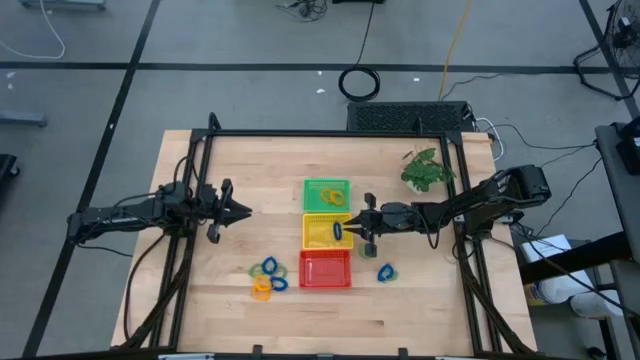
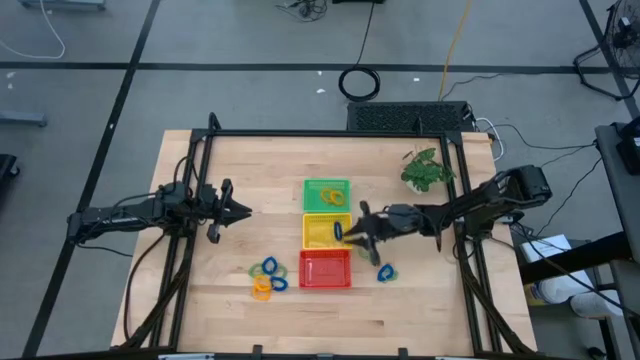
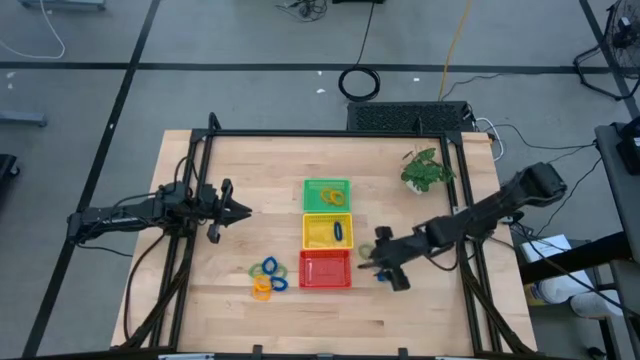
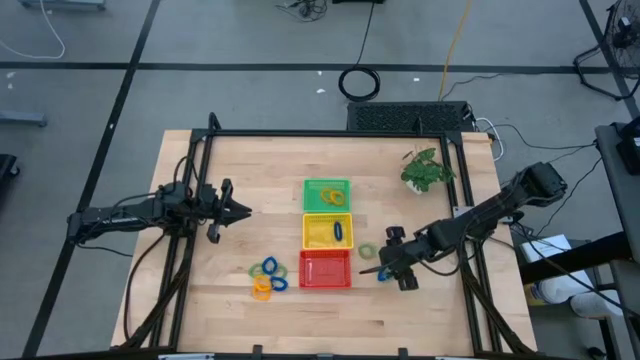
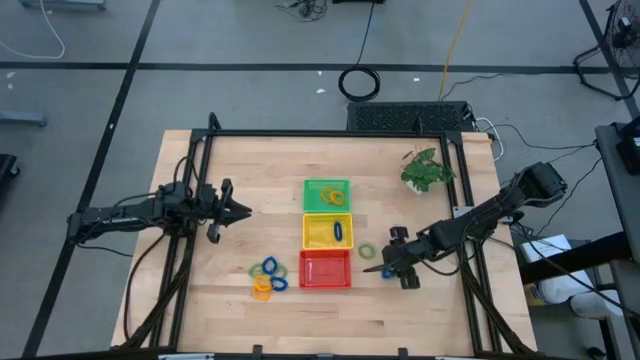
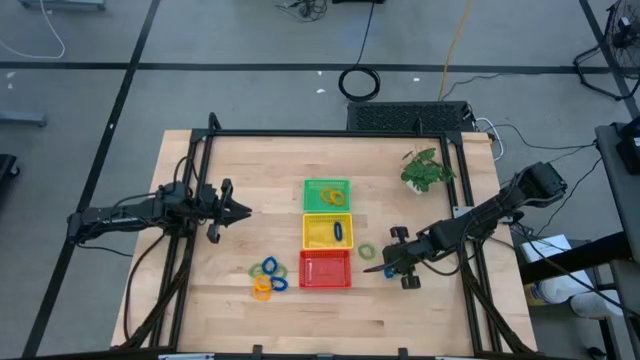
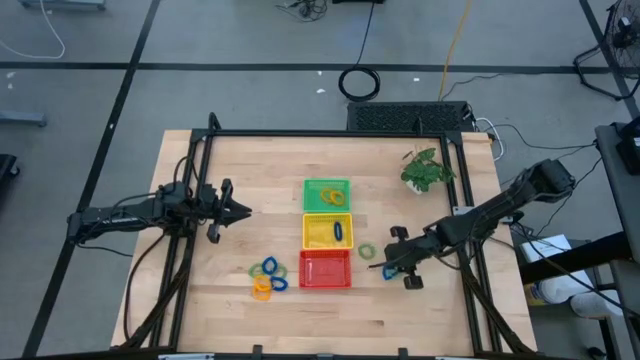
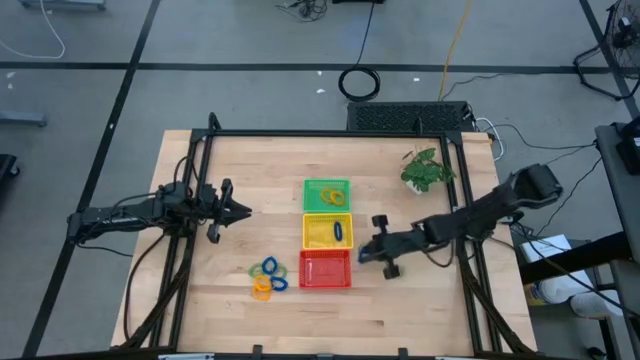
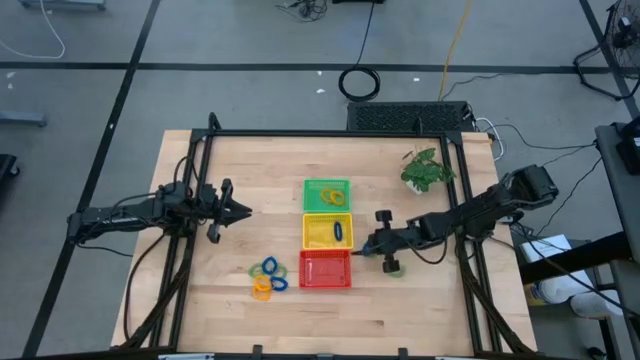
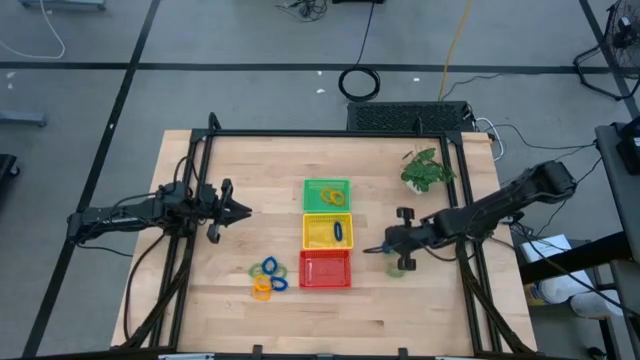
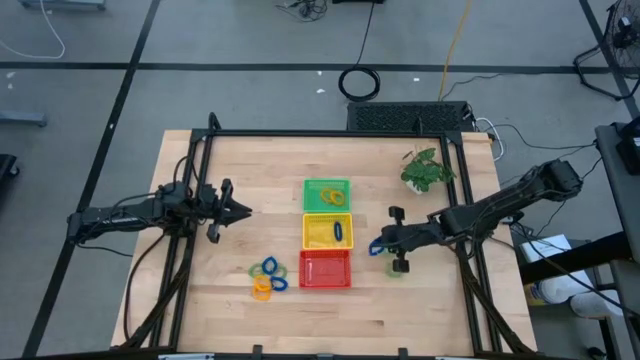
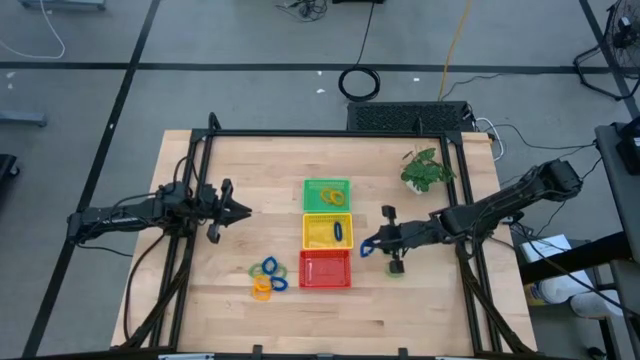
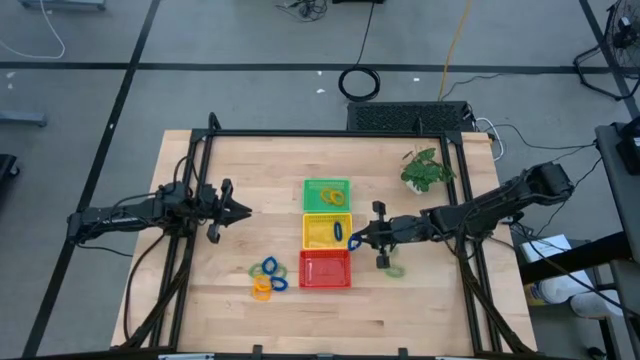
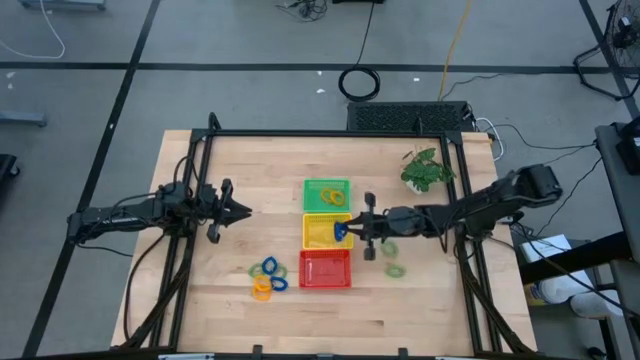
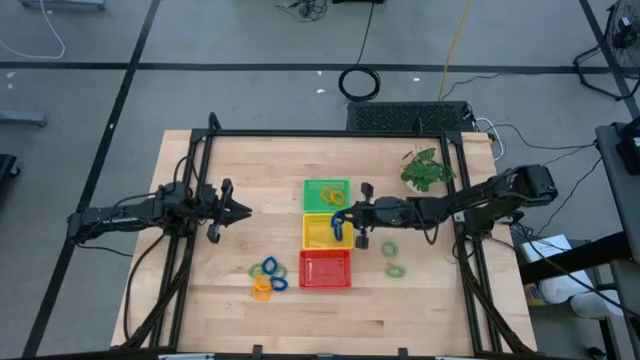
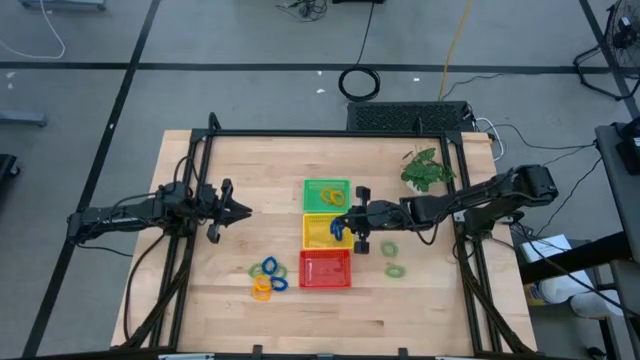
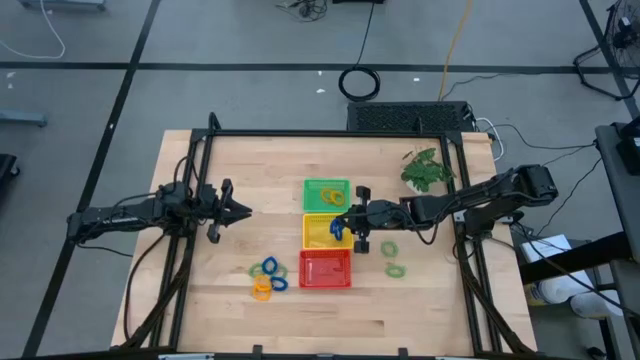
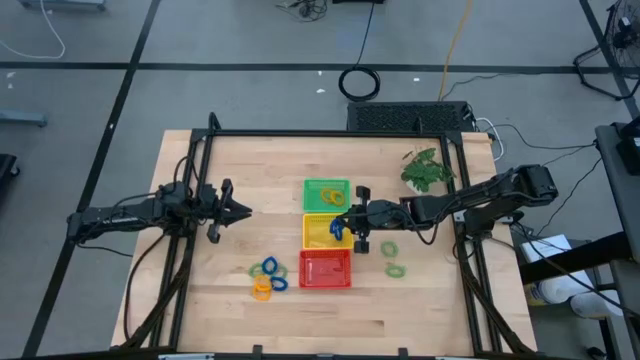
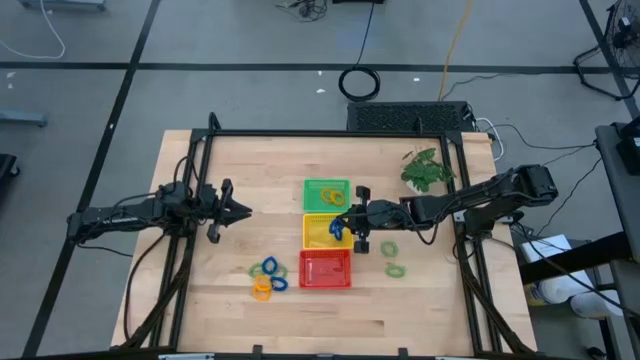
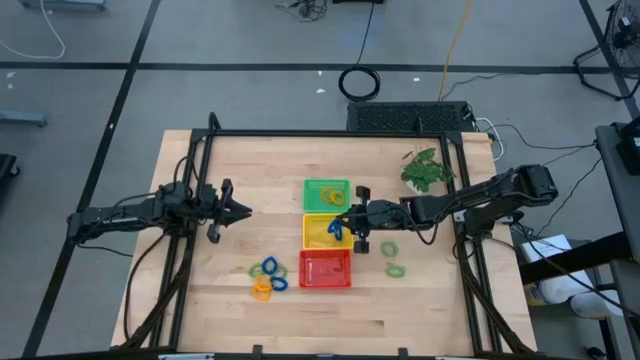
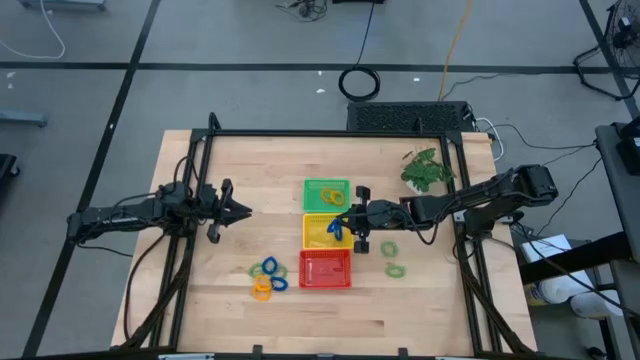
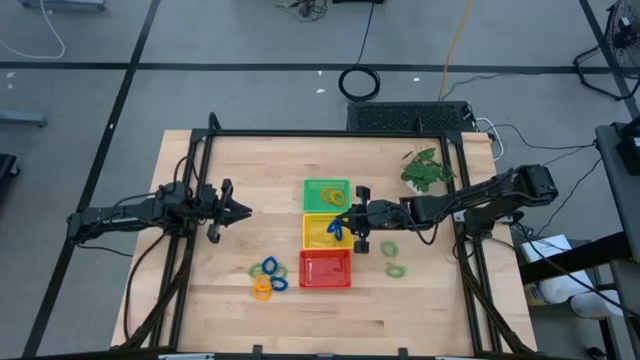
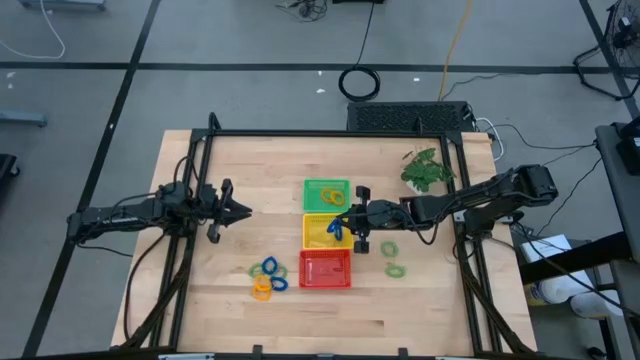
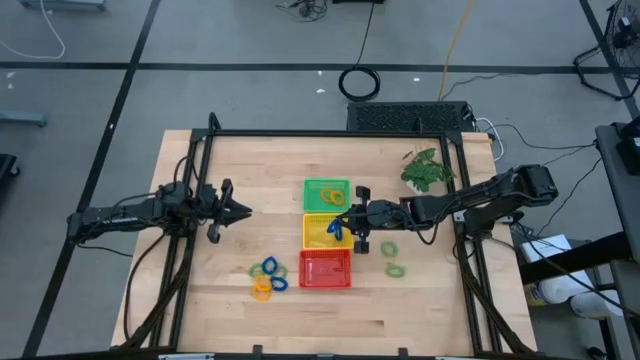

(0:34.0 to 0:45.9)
Task: Sort spring keychains into baskets
Put the blue spring keychain into the yellow basket

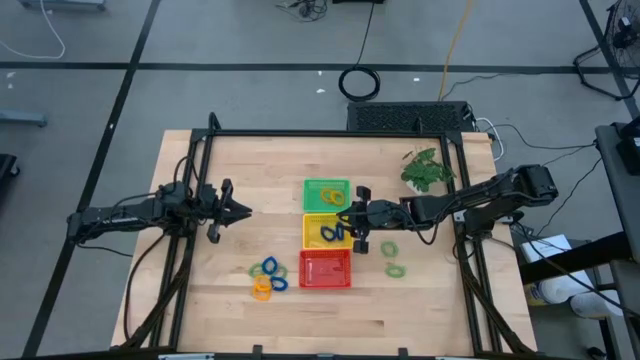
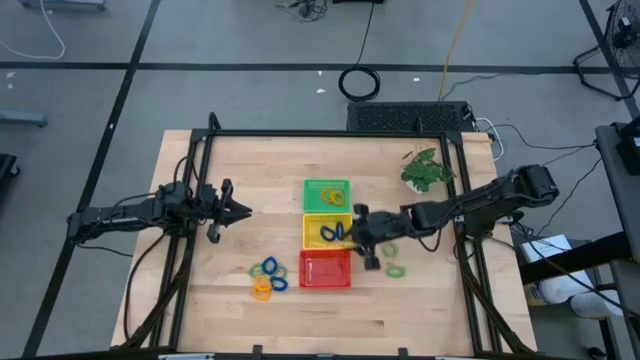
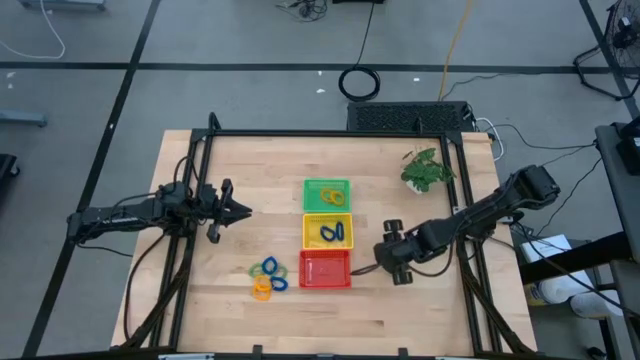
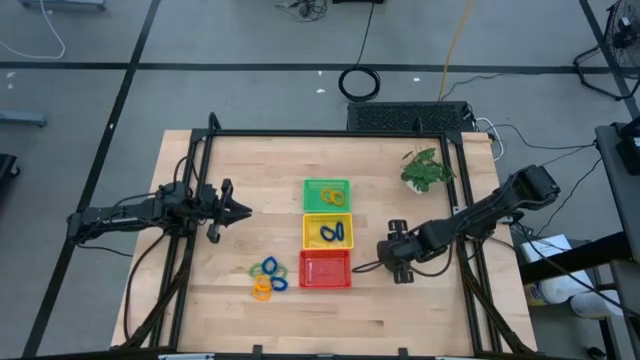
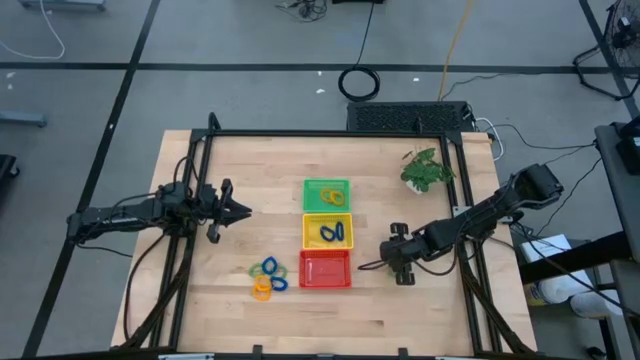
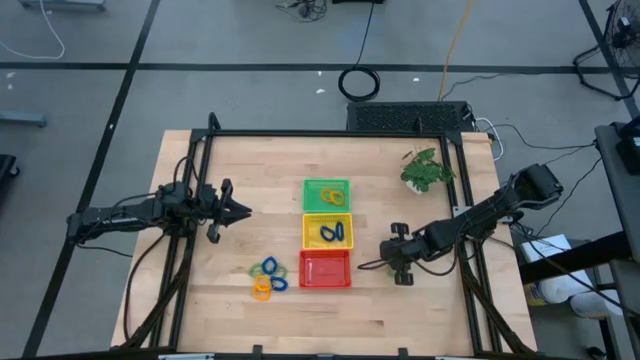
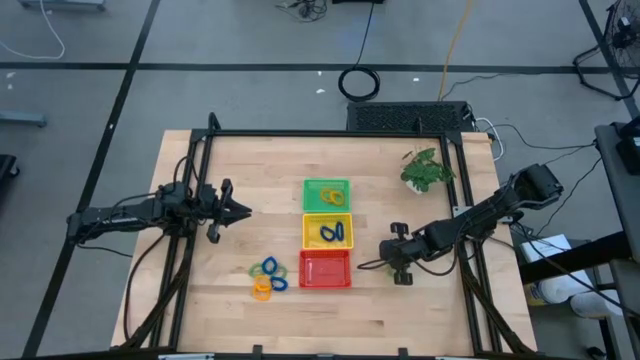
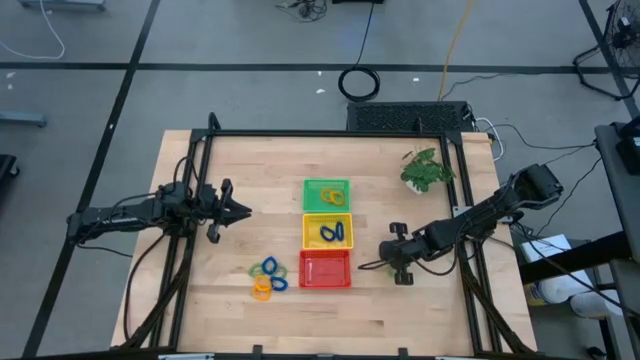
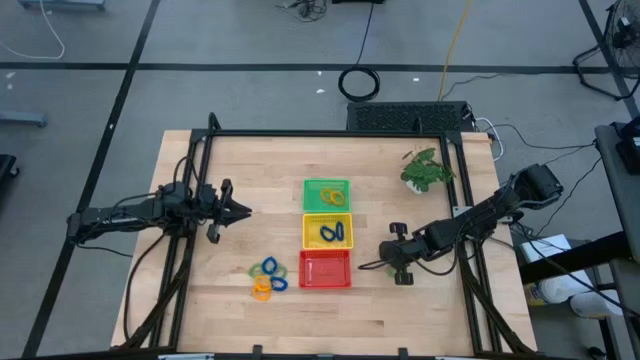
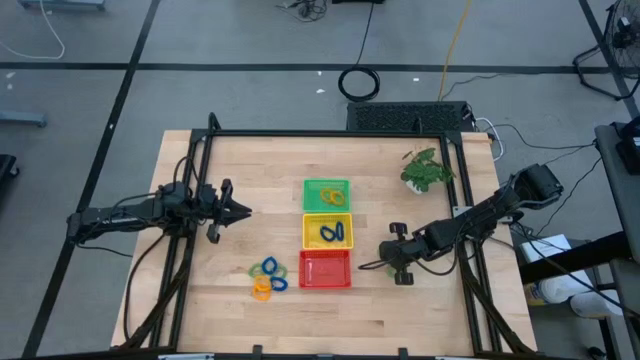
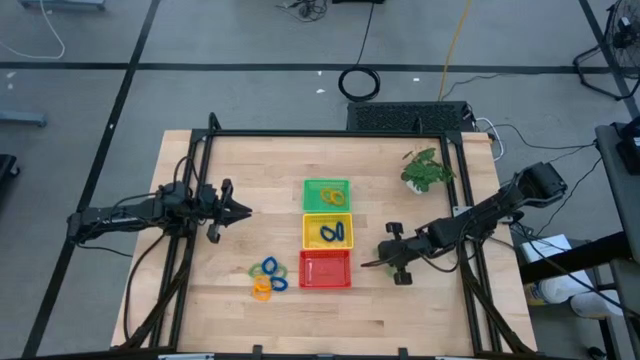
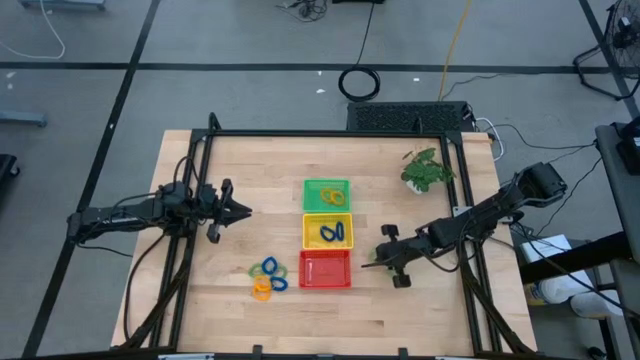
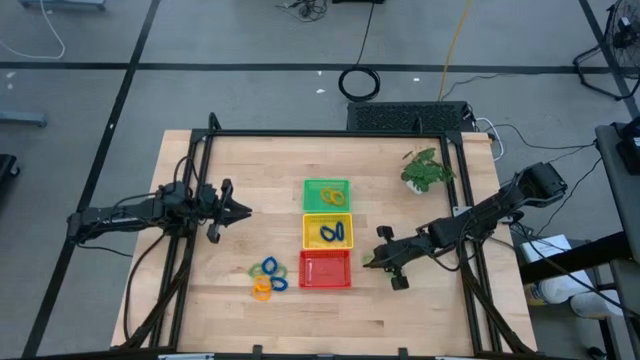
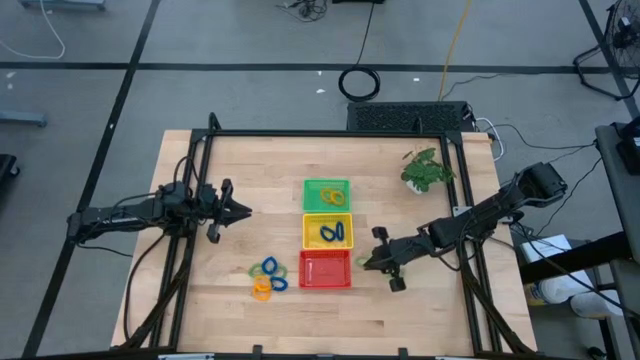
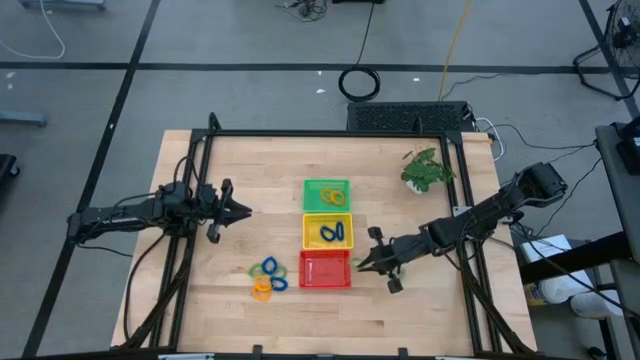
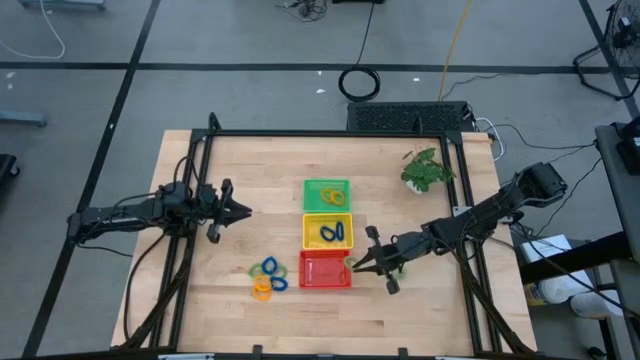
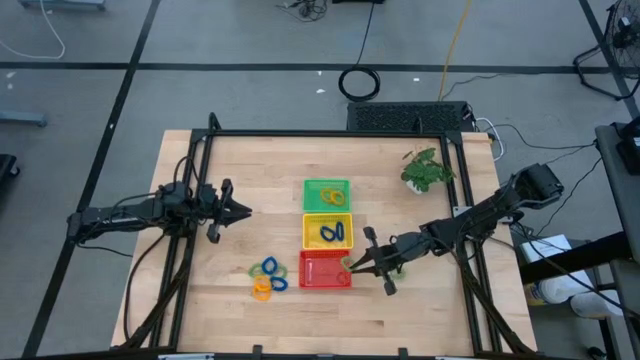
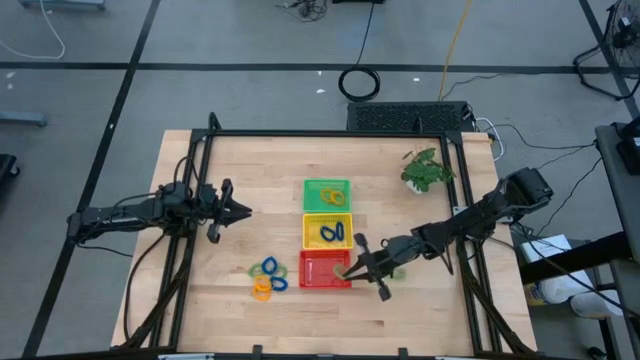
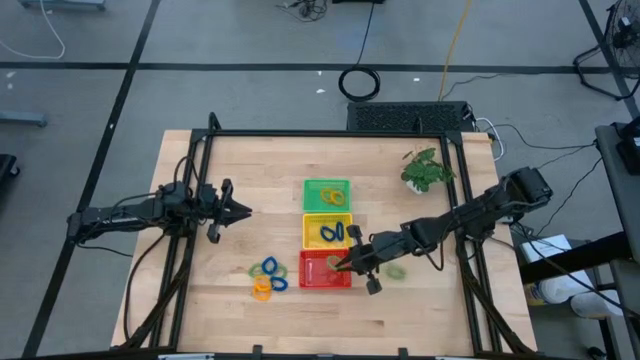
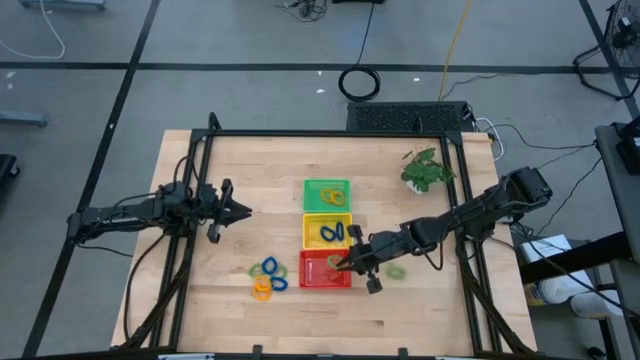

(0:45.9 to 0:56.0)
Put the green spring keychain into the red basket
